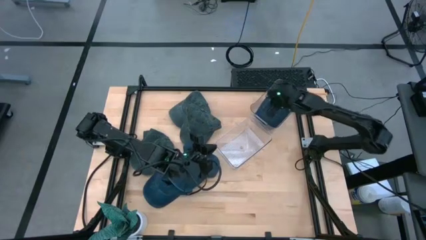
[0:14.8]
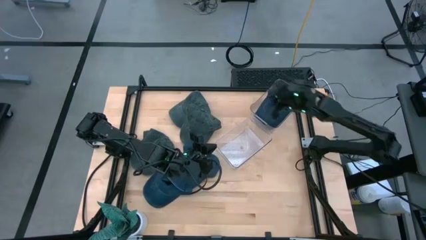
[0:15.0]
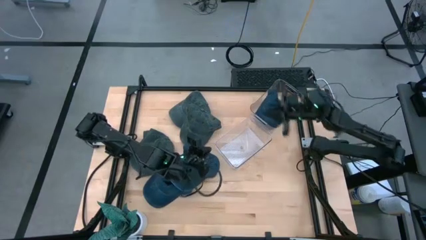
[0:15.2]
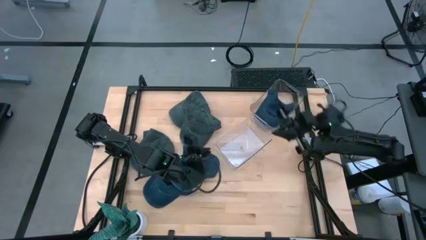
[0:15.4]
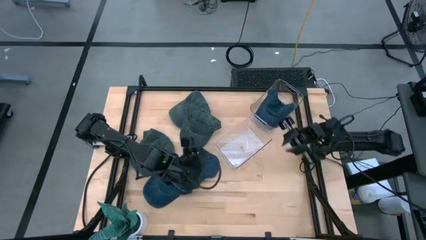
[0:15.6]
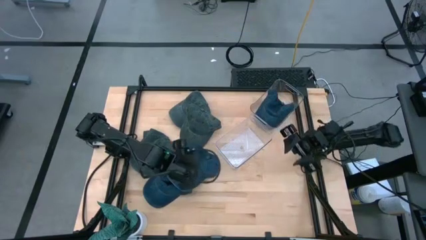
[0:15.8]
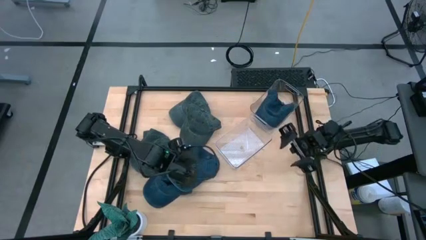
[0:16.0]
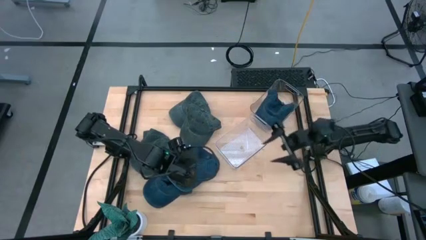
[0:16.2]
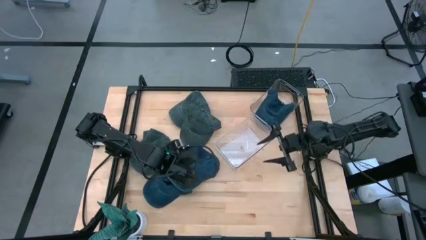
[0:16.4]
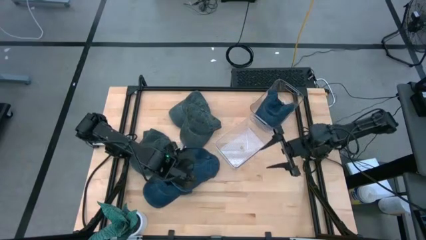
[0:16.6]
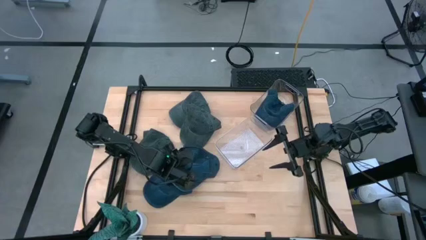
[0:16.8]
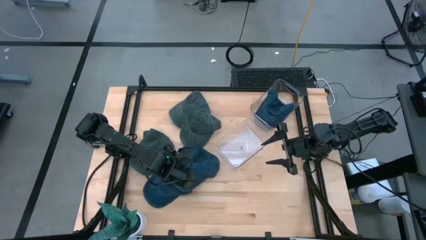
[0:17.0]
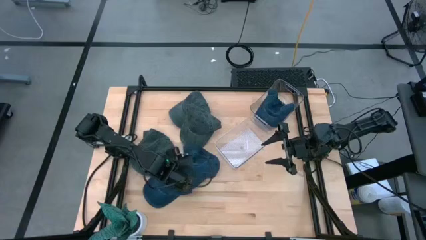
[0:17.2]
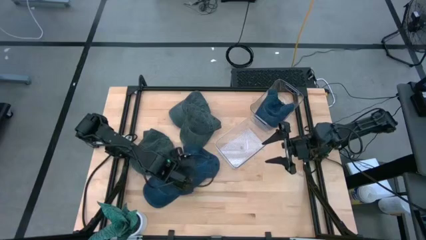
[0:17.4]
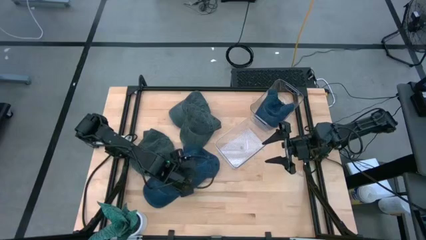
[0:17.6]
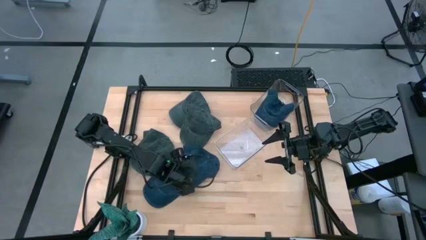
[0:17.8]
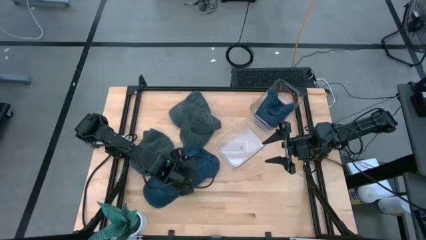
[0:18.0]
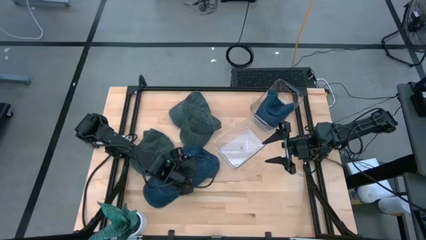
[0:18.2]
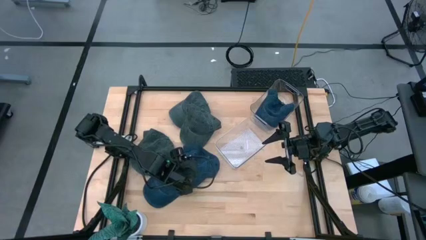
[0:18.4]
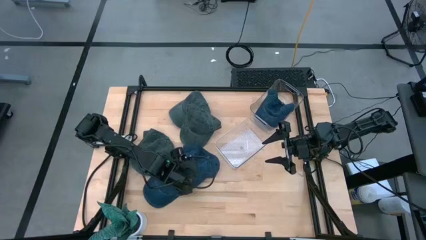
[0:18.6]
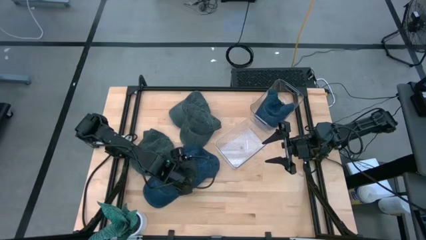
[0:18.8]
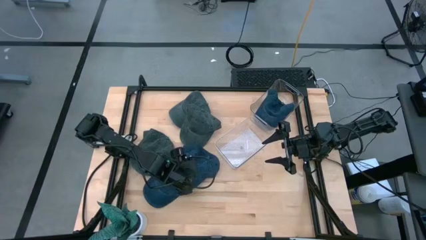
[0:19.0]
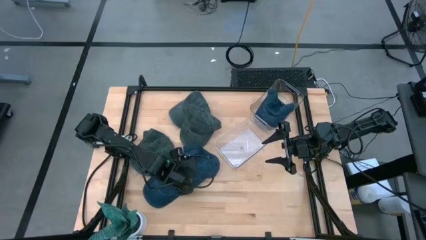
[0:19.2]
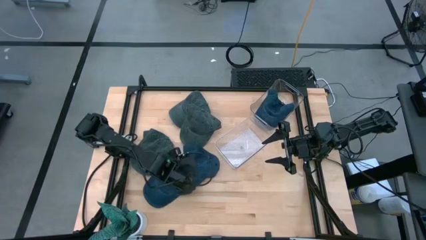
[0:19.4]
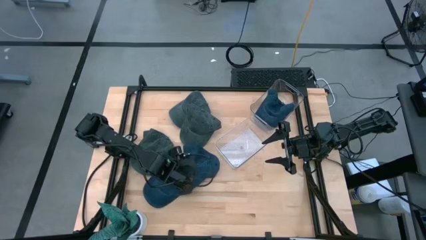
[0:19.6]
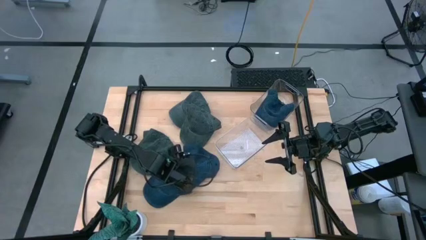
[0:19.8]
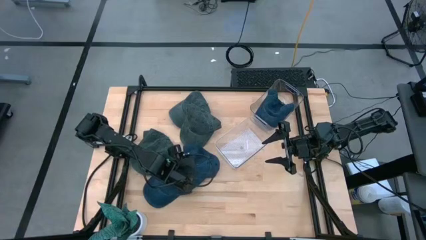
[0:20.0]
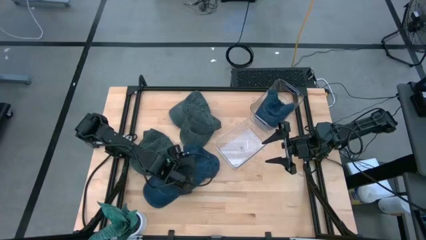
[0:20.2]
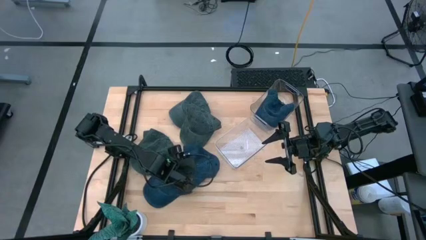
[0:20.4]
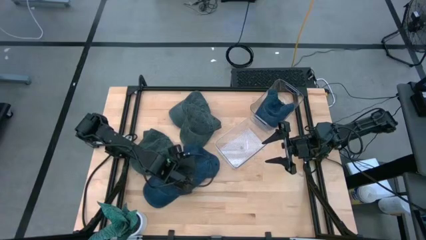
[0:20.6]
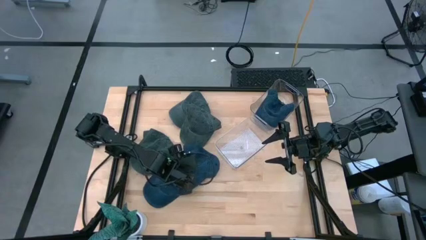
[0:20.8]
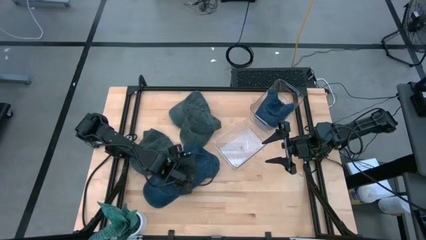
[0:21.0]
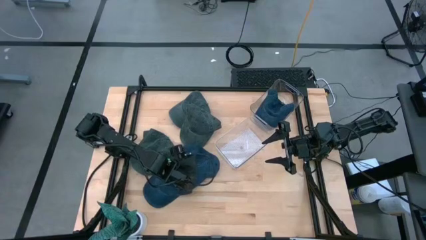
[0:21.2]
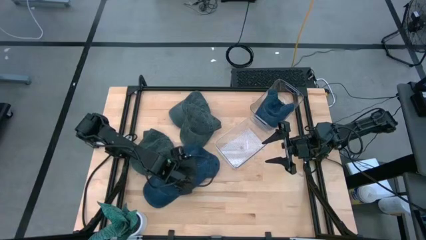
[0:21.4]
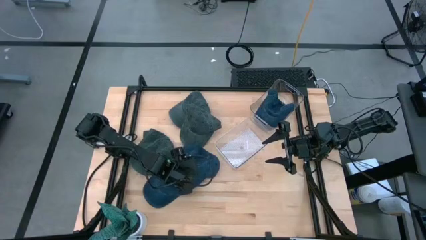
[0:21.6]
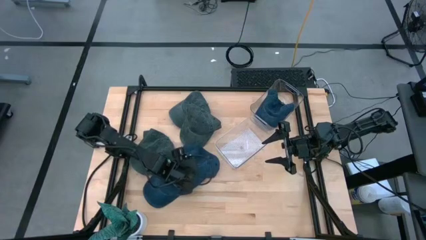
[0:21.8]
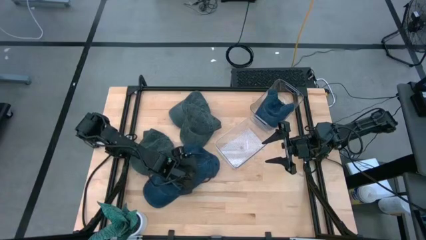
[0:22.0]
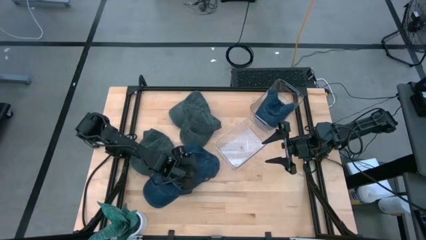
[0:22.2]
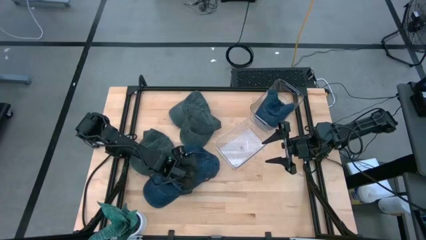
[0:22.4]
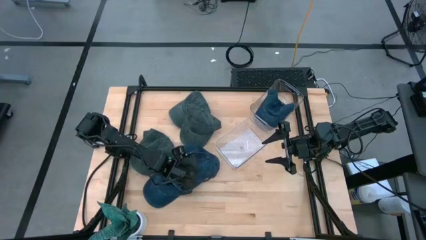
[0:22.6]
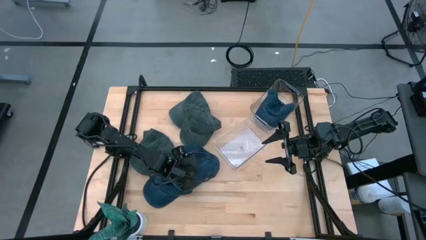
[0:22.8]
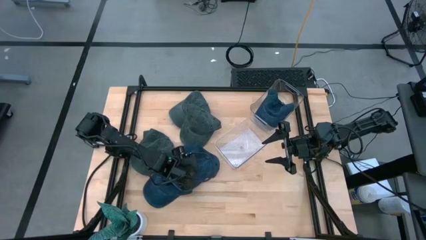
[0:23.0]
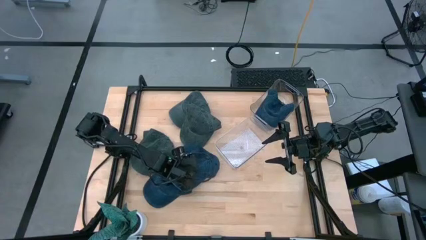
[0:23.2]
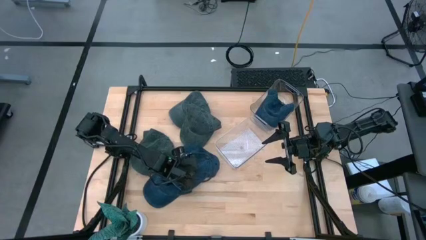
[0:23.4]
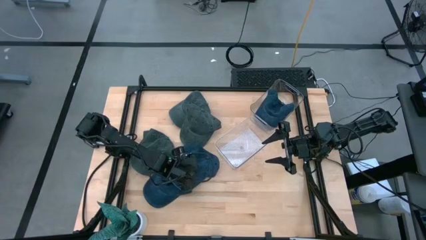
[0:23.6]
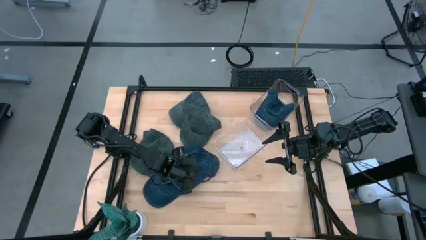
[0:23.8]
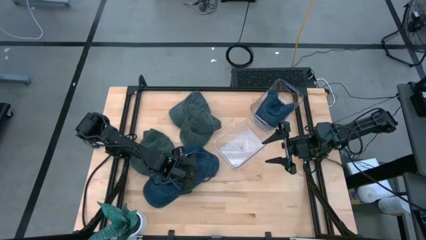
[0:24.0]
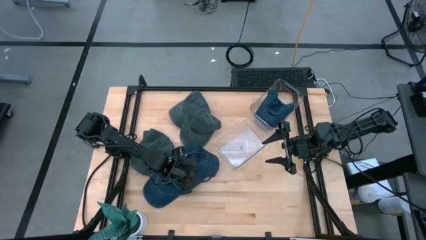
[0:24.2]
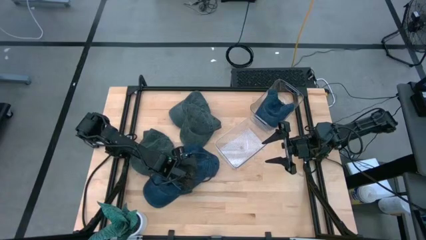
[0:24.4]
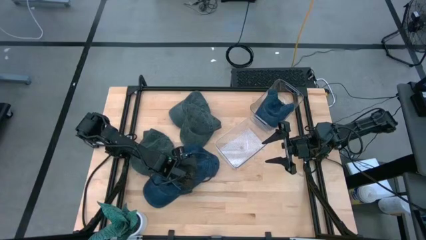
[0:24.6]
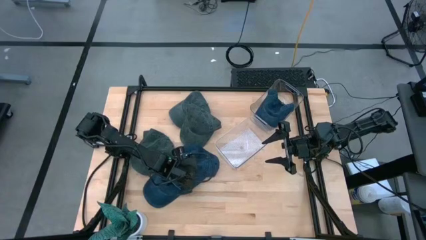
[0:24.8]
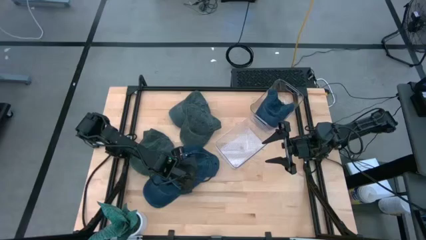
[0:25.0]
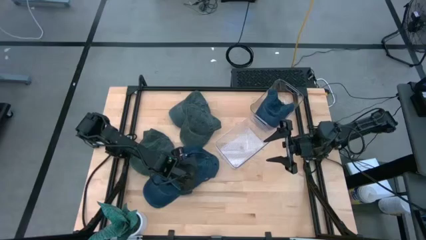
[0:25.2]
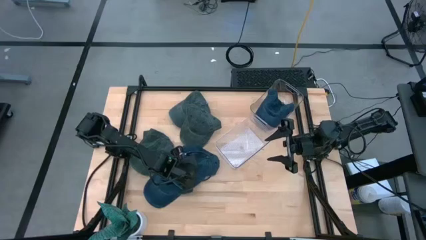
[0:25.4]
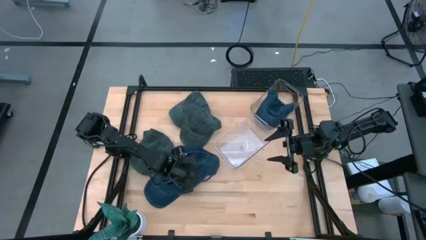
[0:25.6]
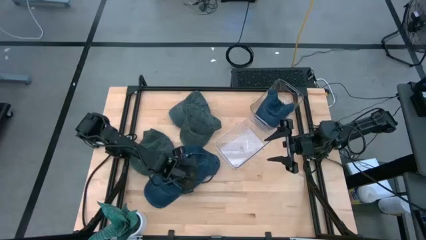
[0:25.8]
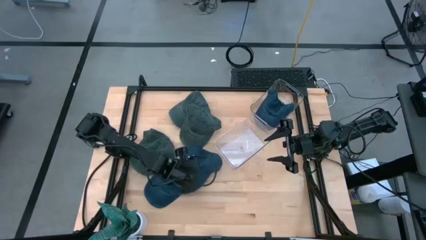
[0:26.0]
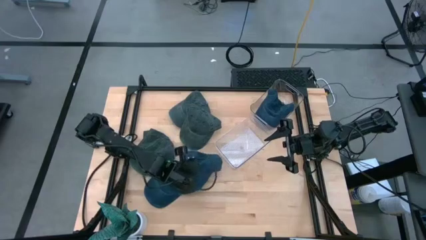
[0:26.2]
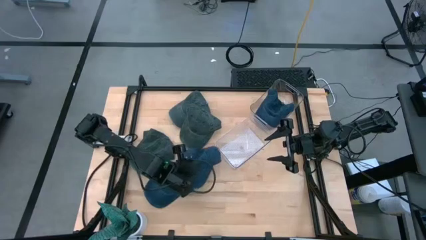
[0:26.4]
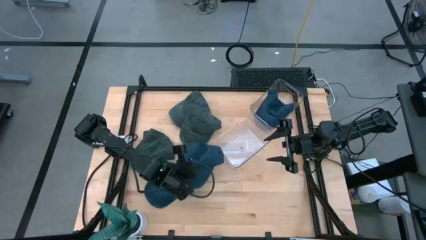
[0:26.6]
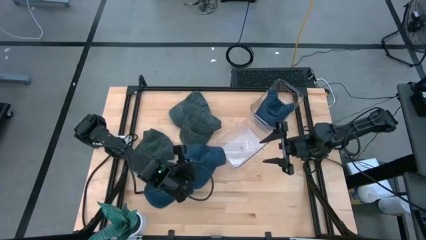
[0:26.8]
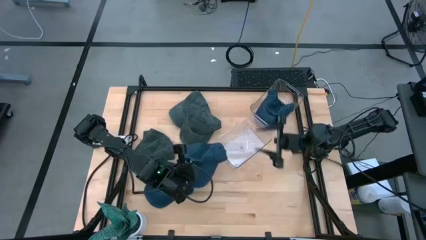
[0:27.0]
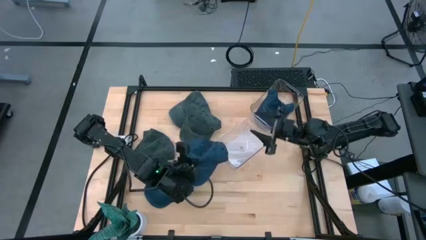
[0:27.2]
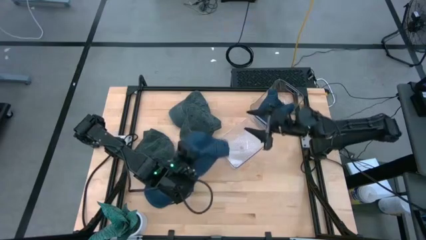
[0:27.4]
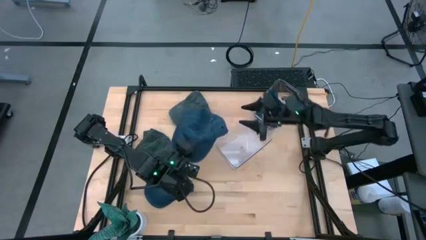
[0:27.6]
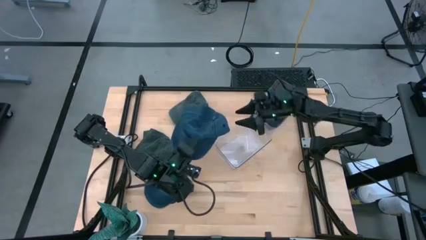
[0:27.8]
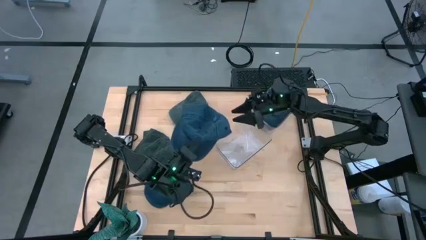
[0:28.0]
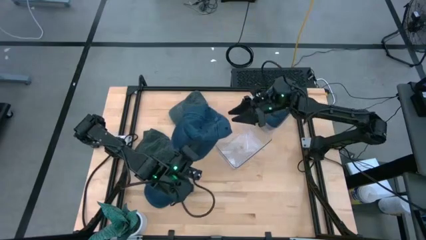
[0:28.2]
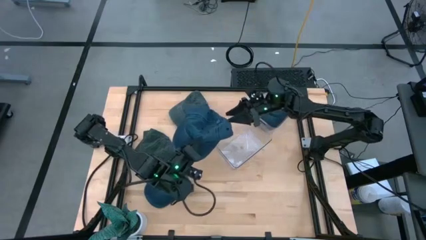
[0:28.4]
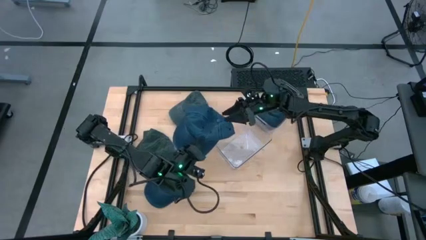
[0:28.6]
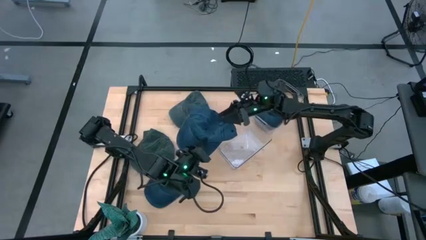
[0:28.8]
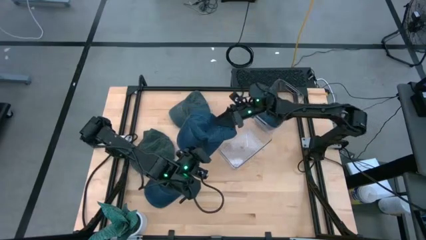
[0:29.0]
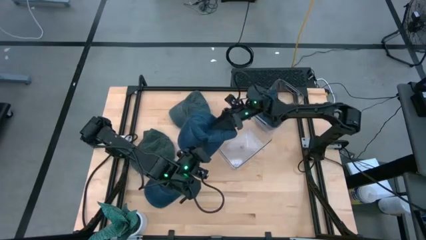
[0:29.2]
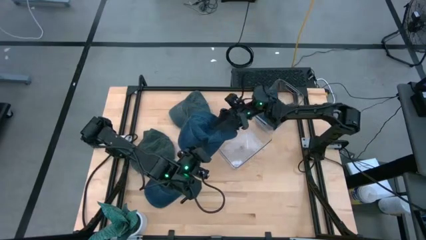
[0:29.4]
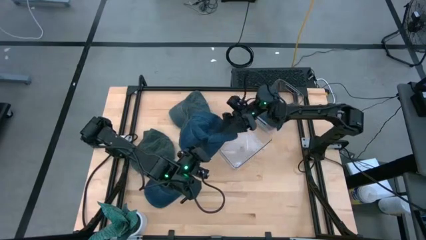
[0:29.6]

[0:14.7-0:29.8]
Task: Pick & Place hat
Put the right blue cap into the top transparent bin
